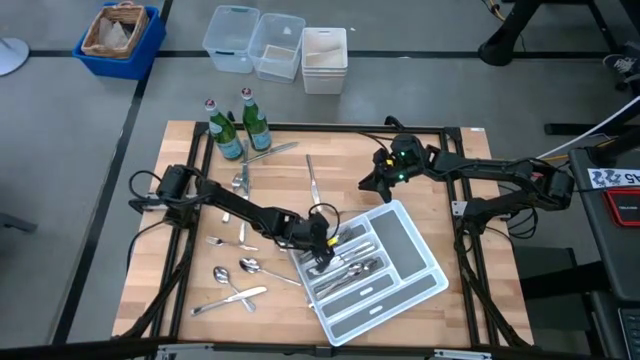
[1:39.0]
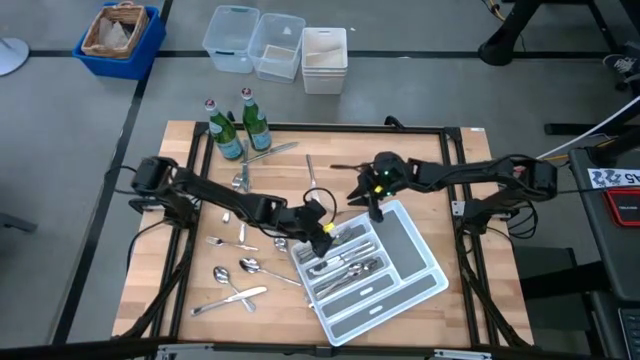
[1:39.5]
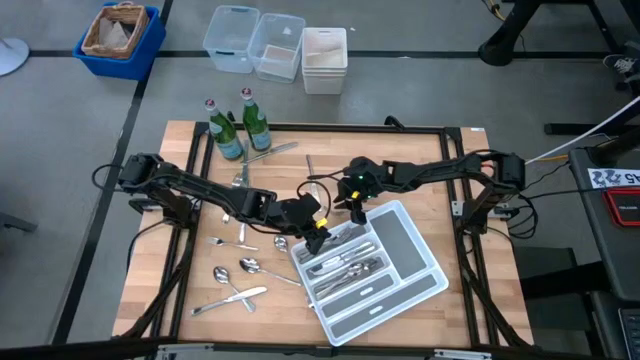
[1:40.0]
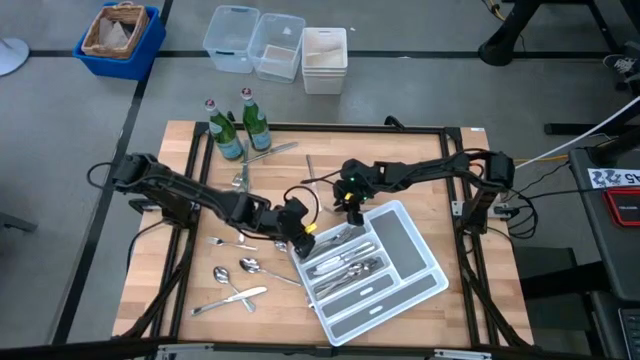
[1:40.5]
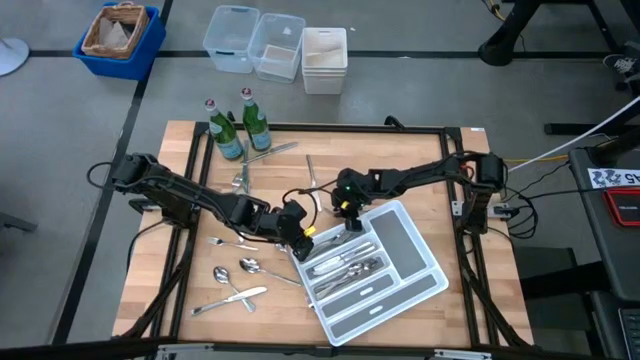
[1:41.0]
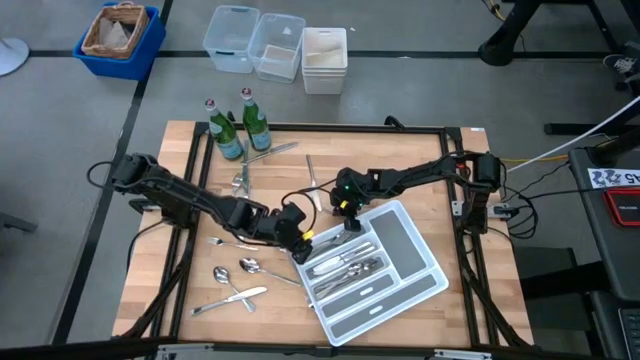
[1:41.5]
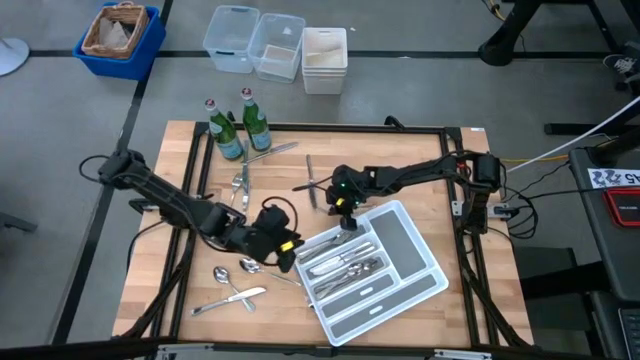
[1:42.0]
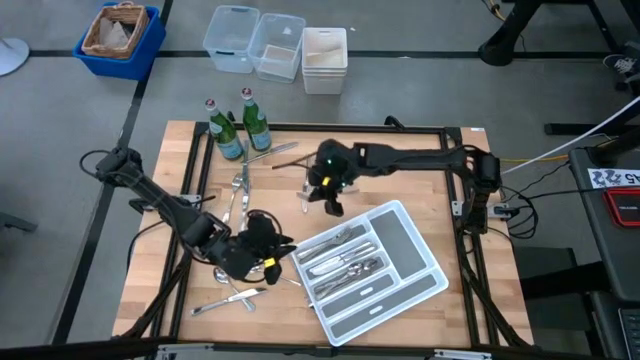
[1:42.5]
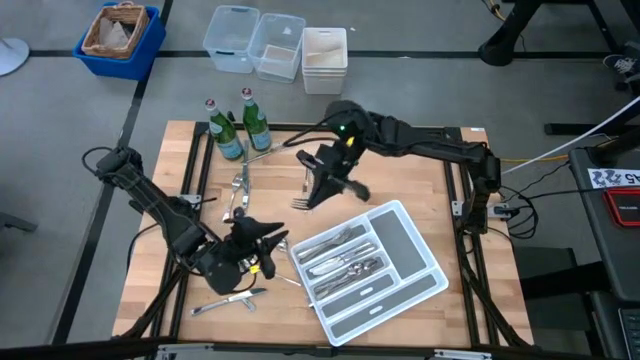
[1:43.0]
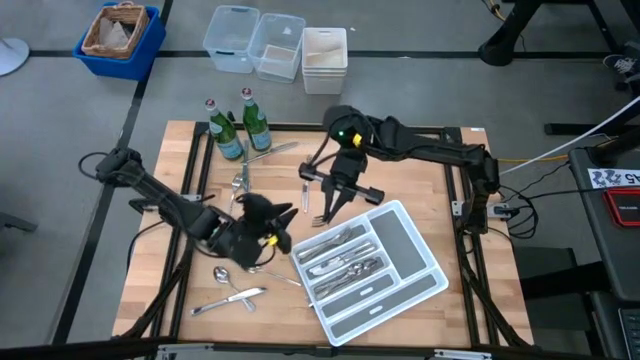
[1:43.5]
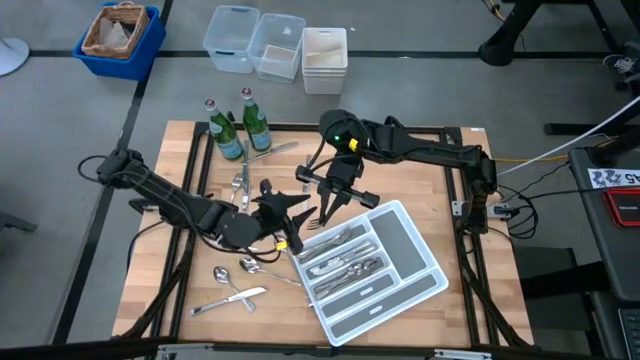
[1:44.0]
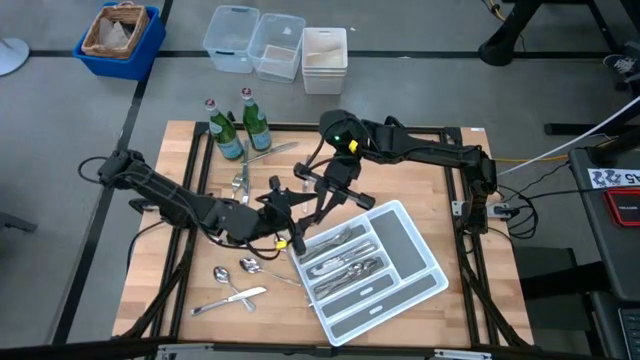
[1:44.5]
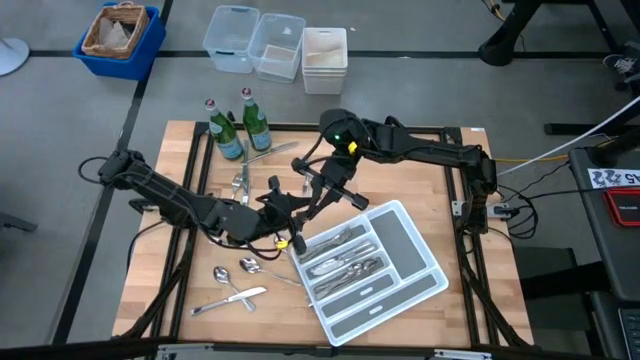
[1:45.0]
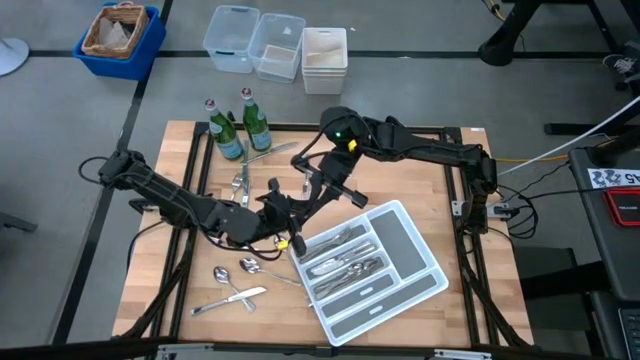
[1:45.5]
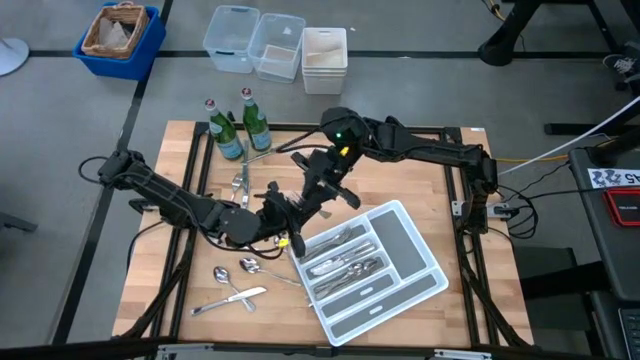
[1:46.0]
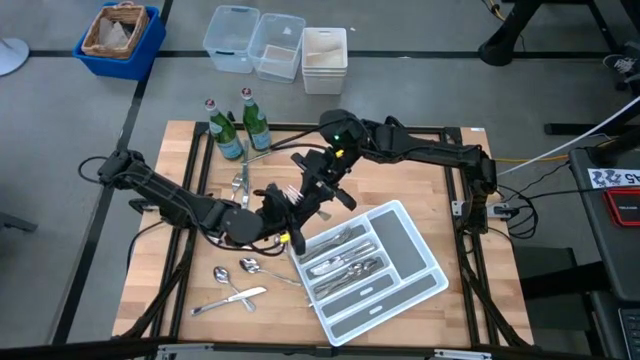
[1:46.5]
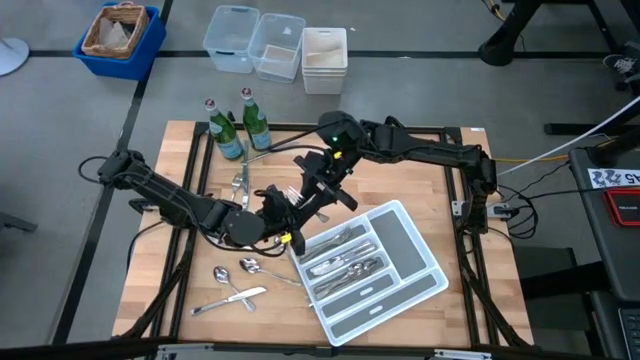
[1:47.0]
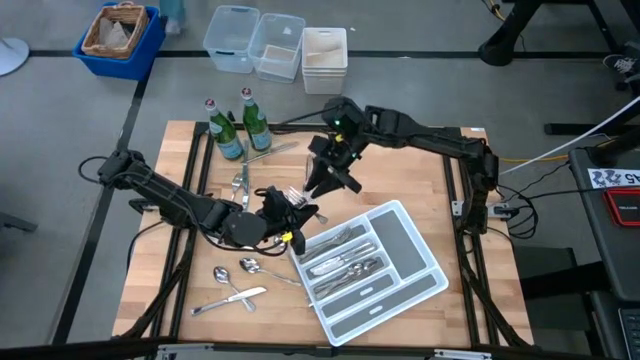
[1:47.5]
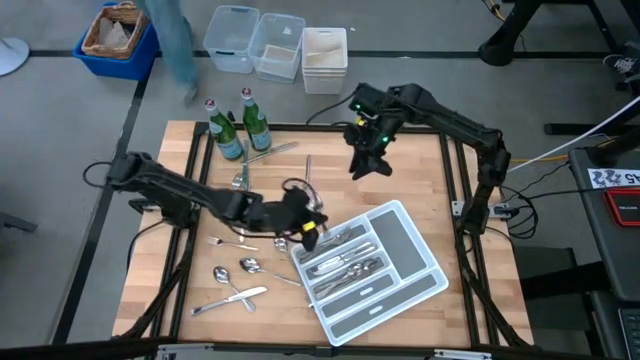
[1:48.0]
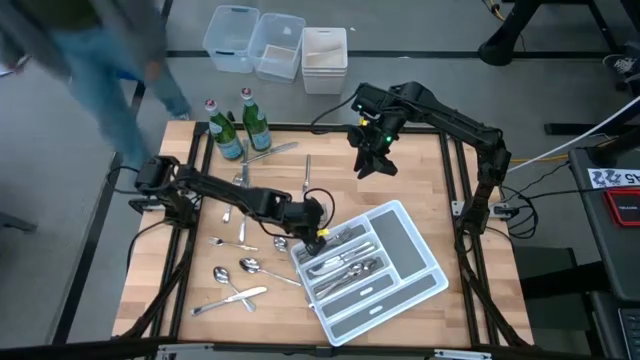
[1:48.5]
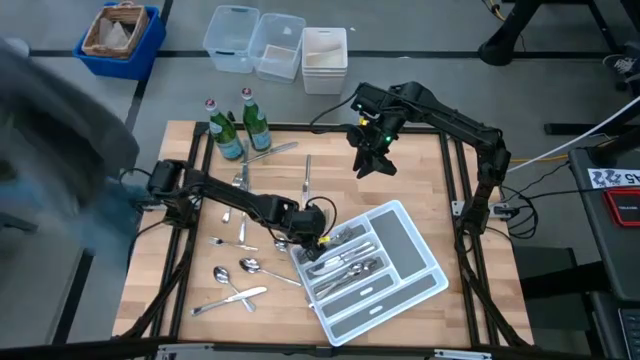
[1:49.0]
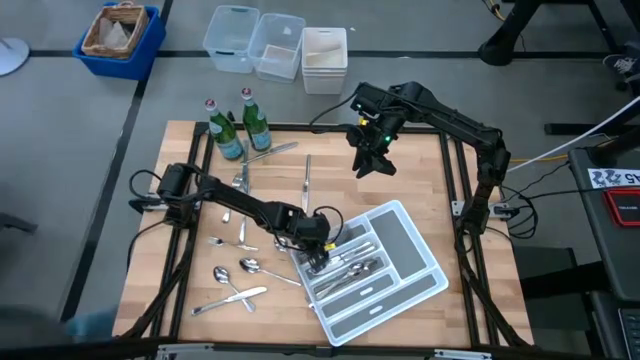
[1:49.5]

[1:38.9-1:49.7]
Task: Sort silverware
Put the silver fork into the white silverware tray

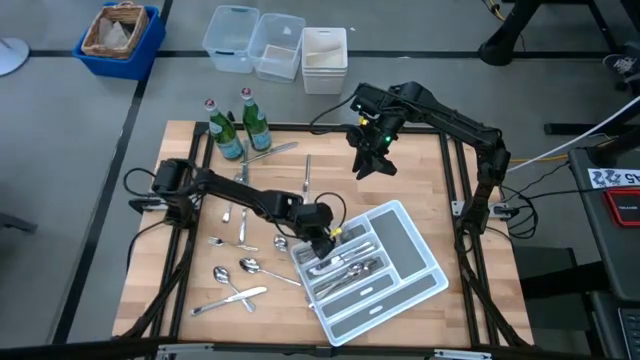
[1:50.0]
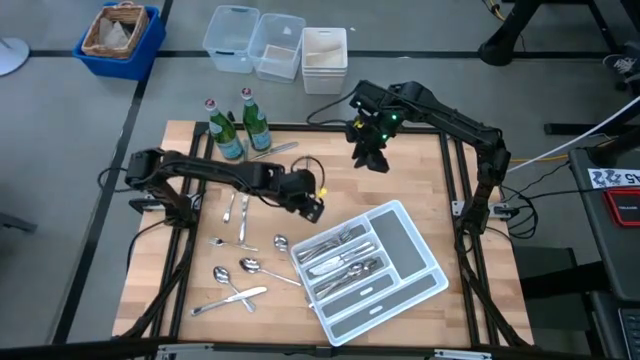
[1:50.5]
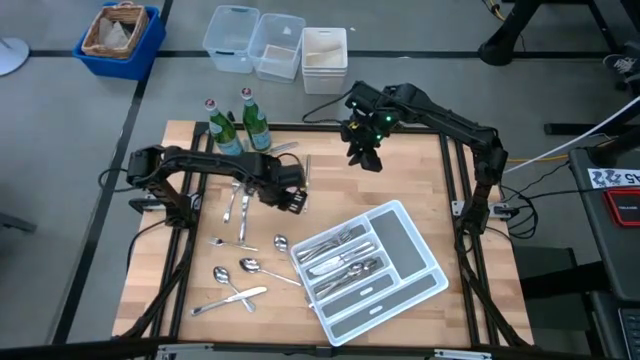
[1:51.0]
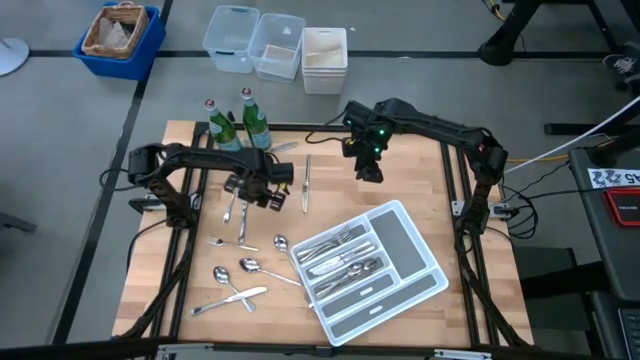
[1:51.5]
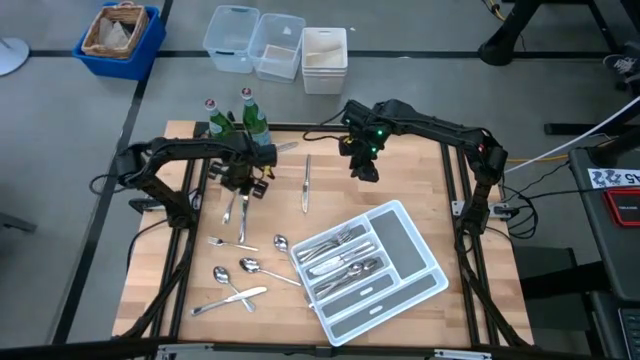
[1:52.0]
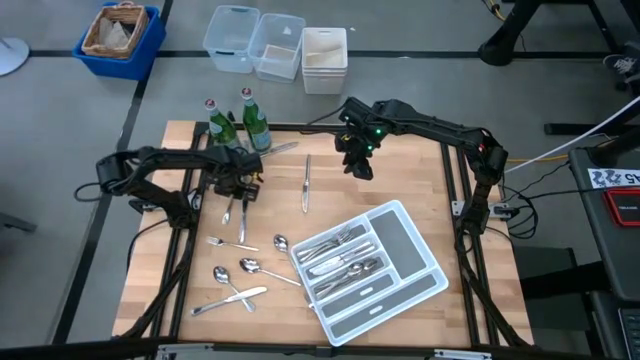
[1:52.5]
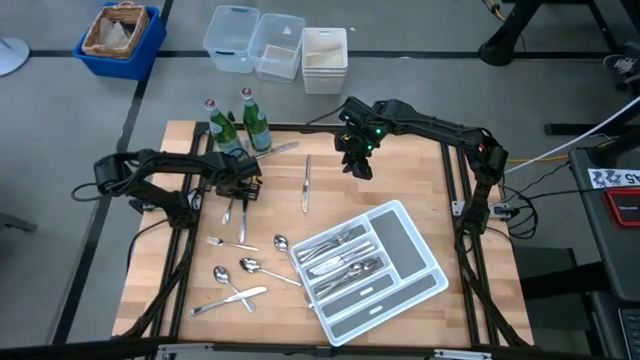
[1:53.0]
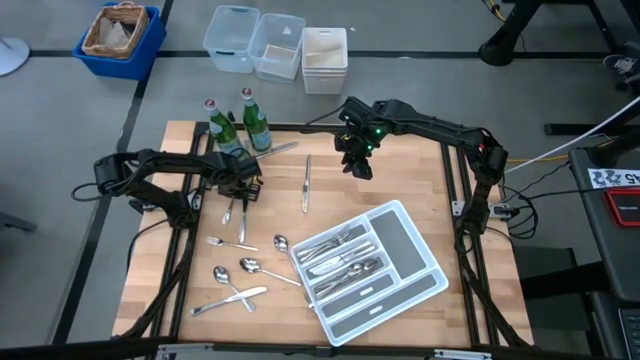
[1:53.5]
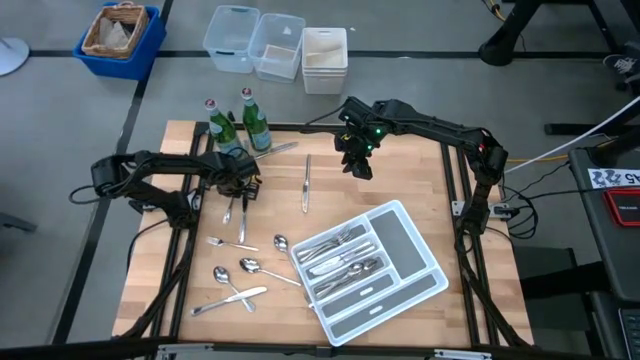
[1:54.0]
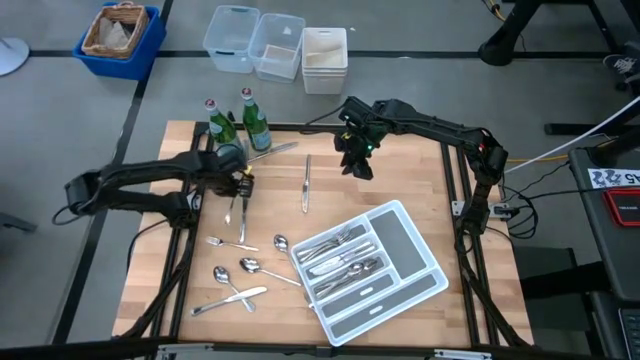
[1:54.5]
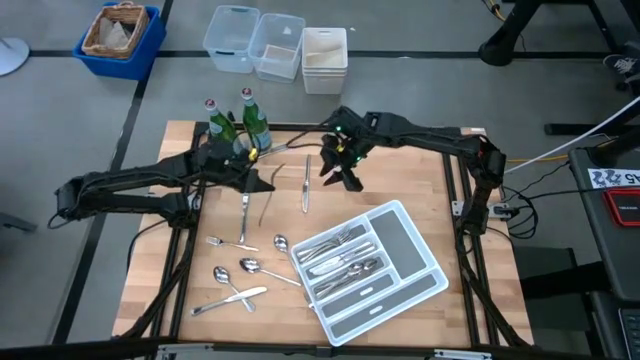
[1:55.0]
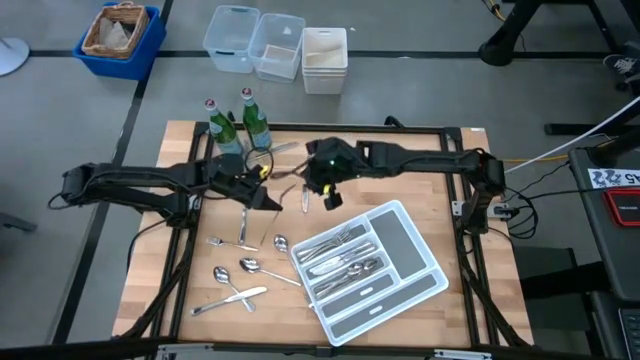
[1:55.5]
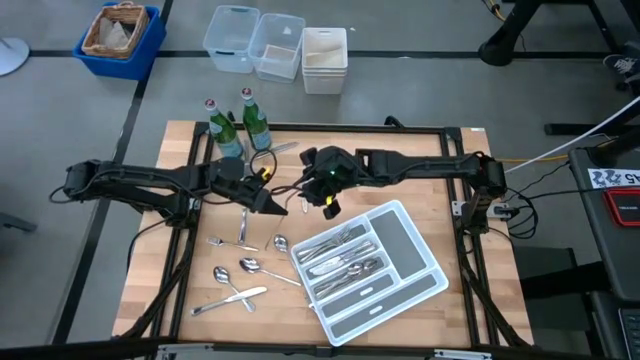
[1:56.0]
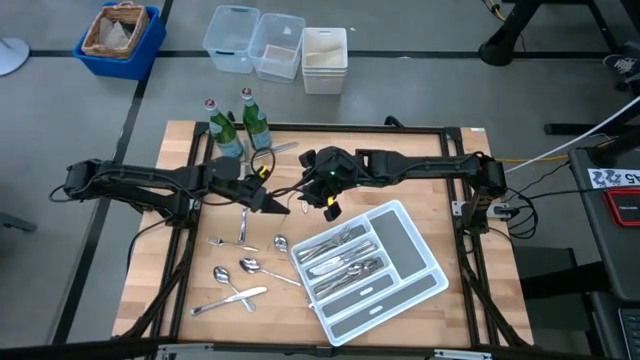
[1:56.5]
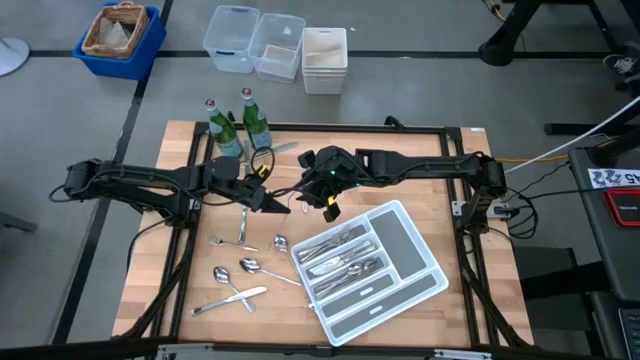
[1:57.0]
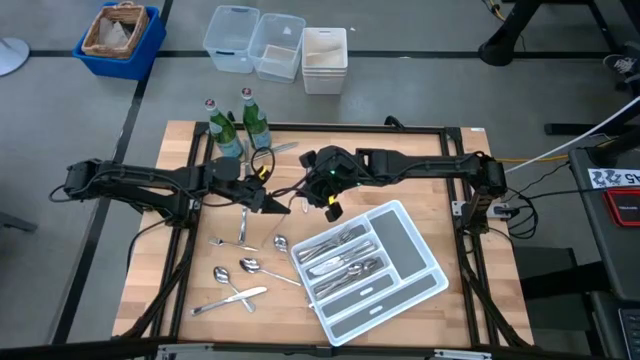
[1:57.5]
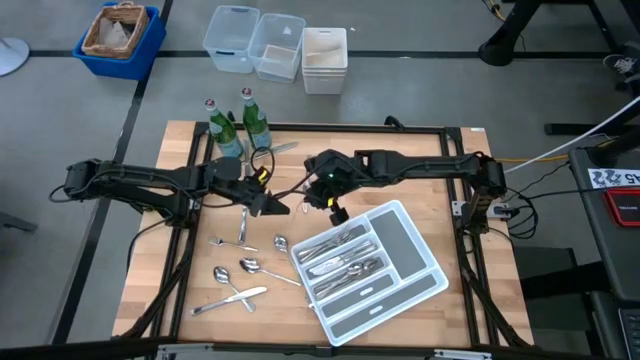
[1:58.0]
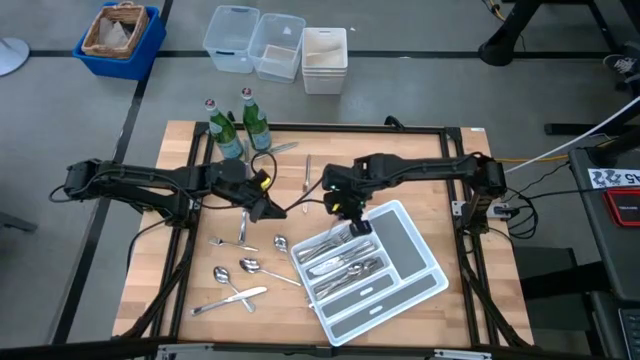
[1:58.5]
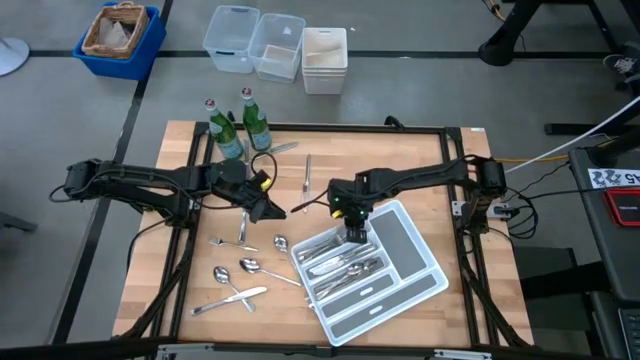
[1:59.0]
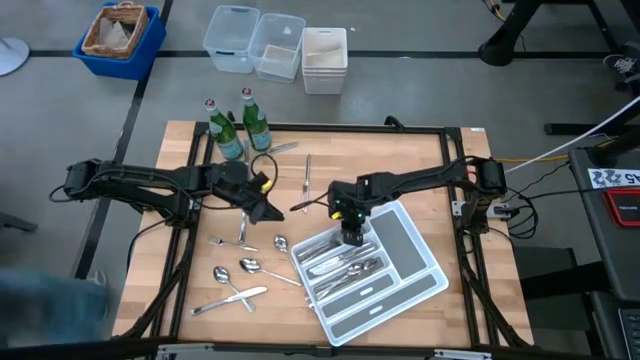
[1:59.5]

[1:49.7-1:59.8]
Put the silver fork into the white silverware tray

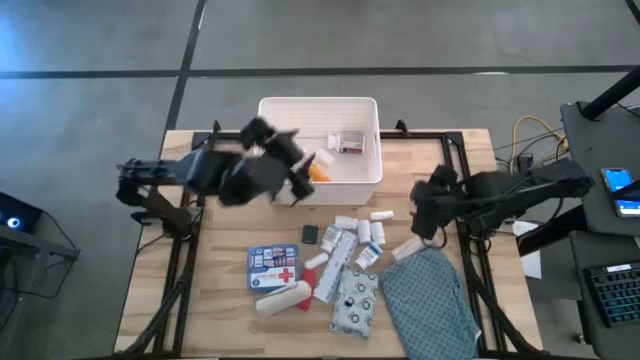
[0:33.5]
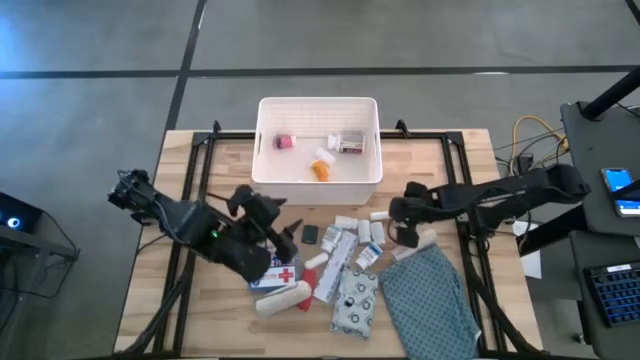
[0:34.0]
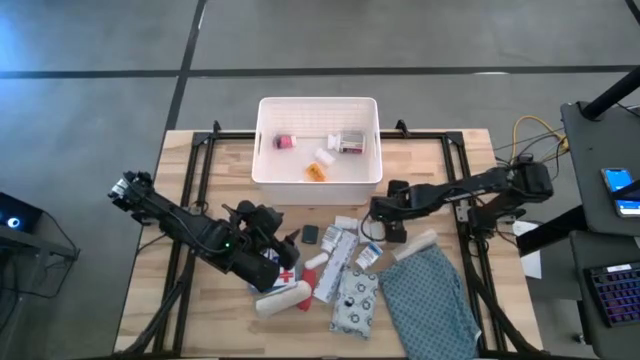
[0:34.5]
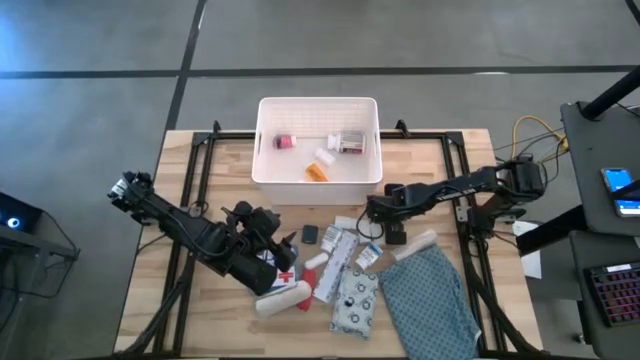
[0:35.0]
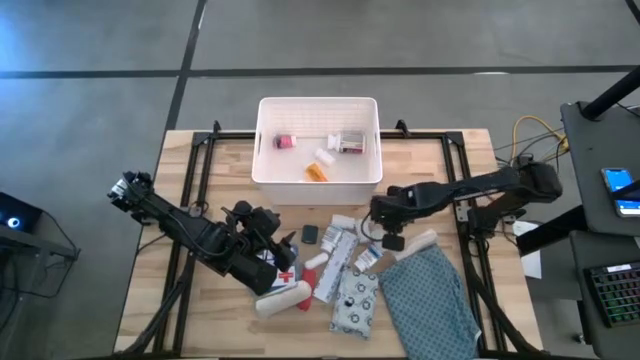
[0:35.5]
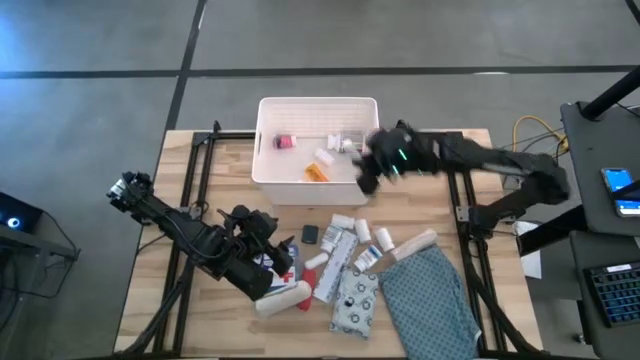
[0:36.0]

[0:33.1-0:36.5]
Task: Pick & place medical supplies in basket/bin
Put the white gauze into the white bin
